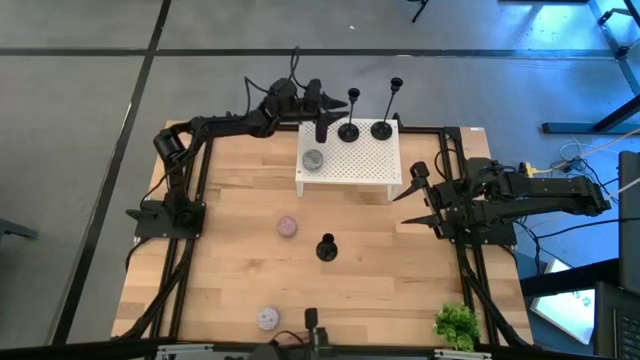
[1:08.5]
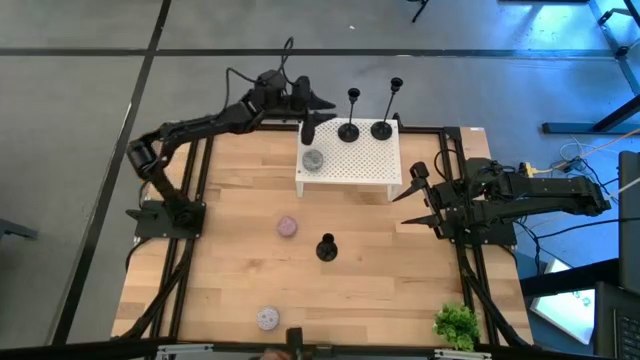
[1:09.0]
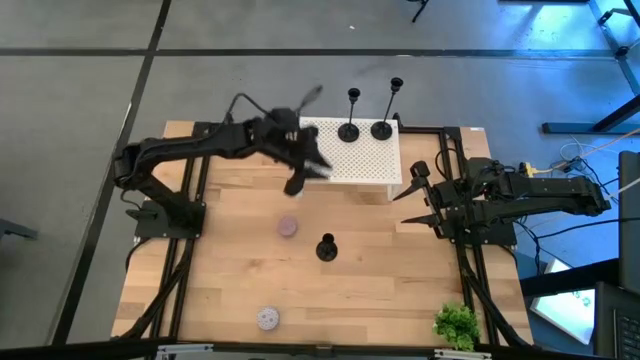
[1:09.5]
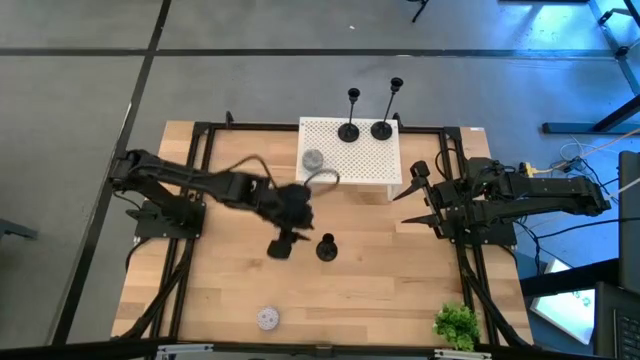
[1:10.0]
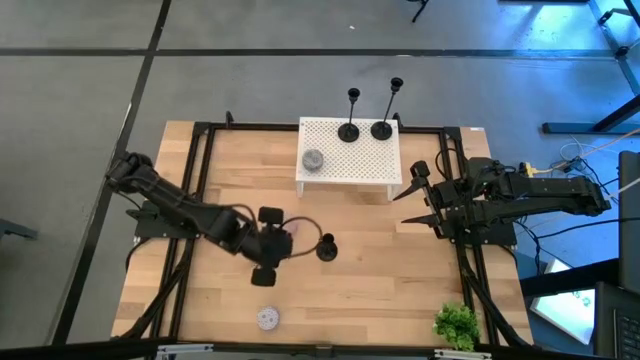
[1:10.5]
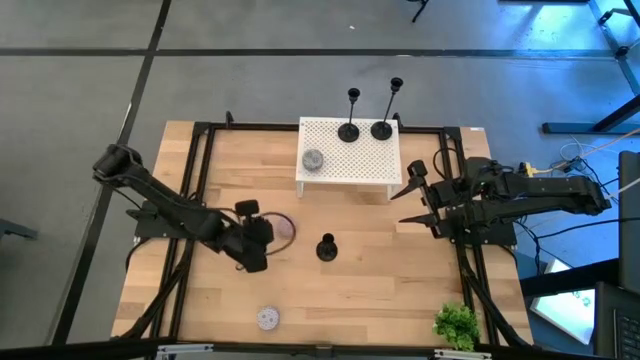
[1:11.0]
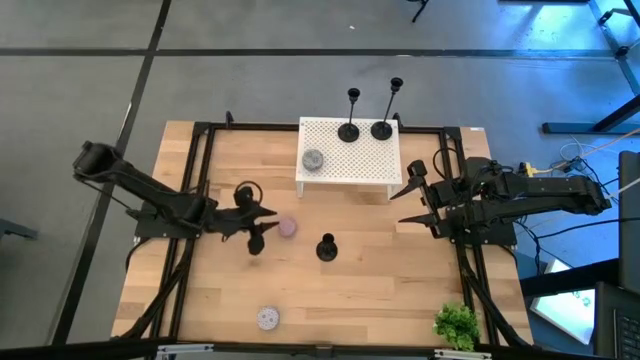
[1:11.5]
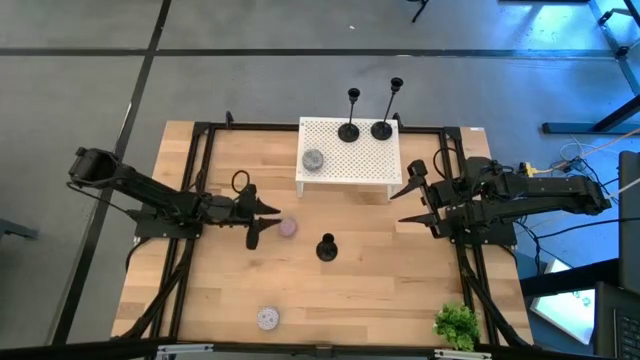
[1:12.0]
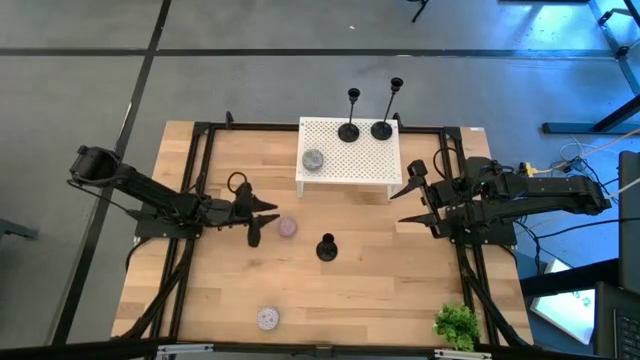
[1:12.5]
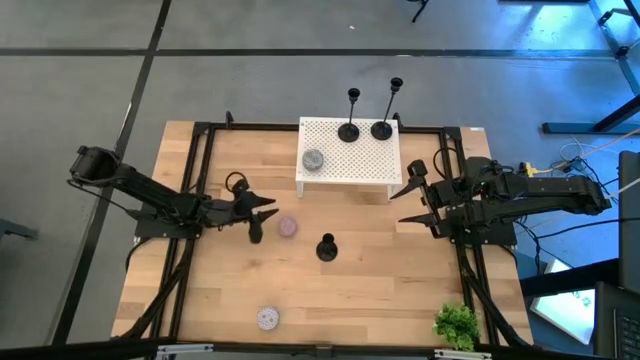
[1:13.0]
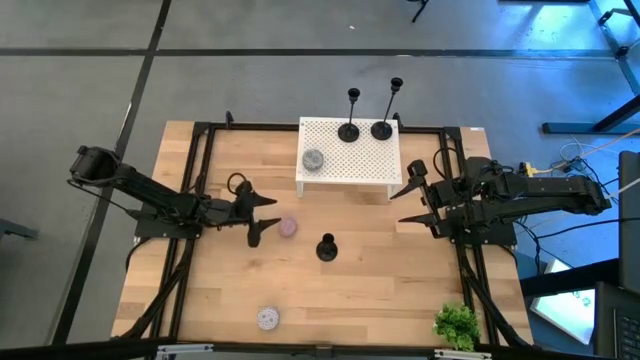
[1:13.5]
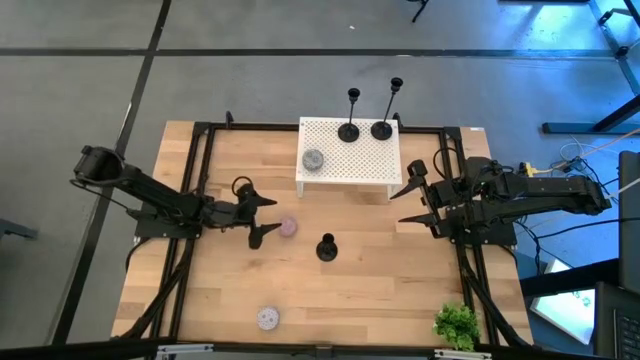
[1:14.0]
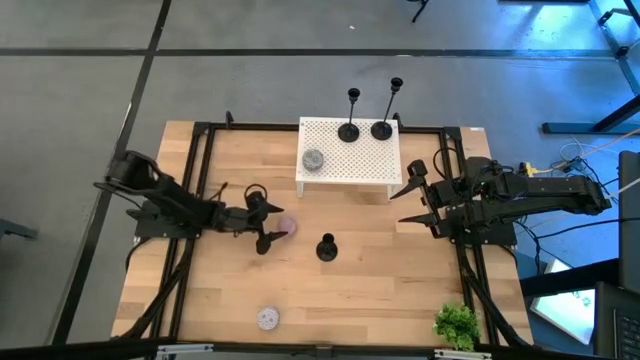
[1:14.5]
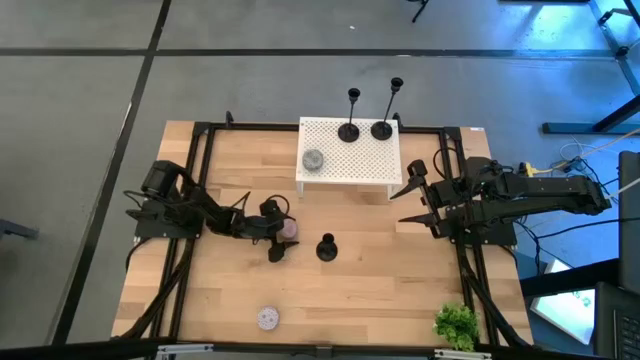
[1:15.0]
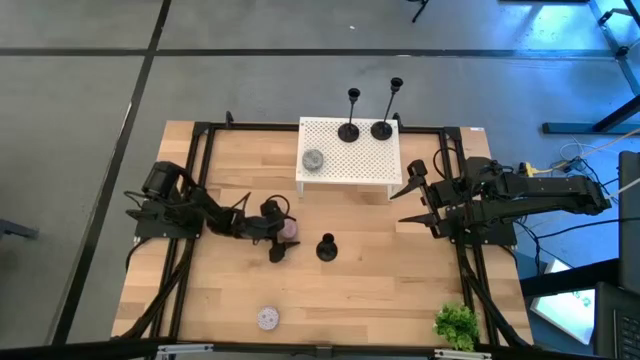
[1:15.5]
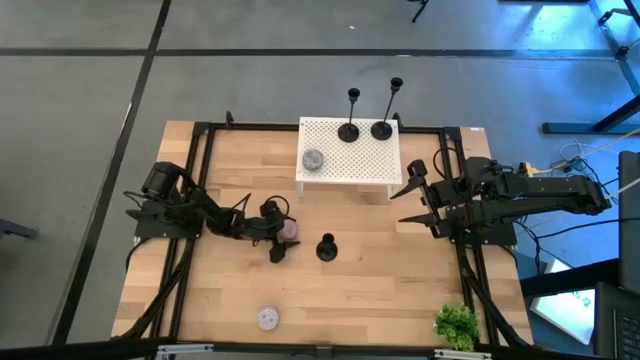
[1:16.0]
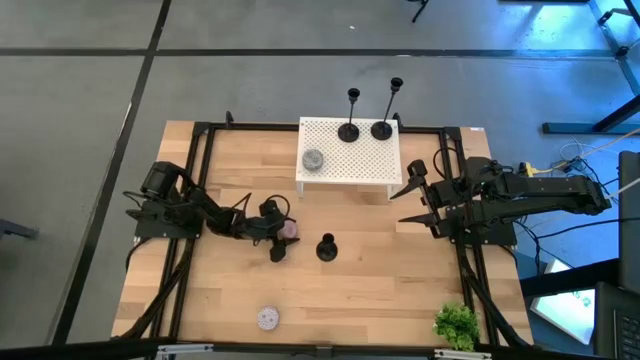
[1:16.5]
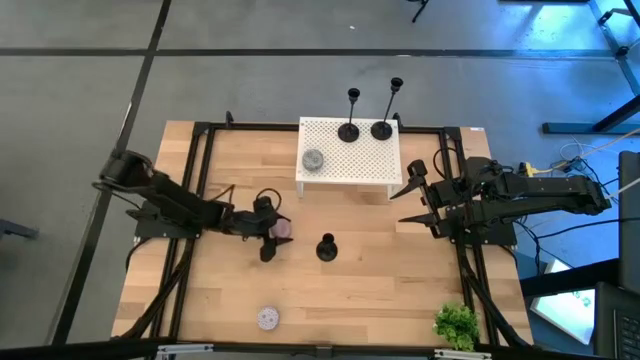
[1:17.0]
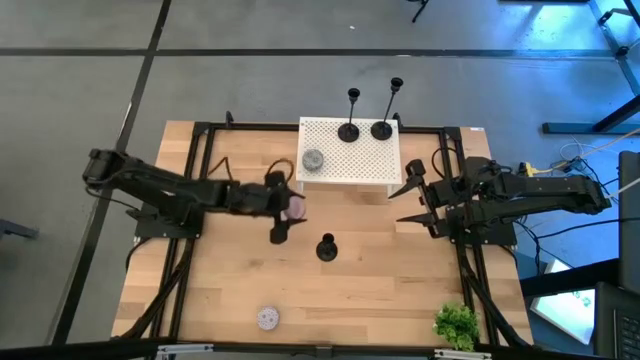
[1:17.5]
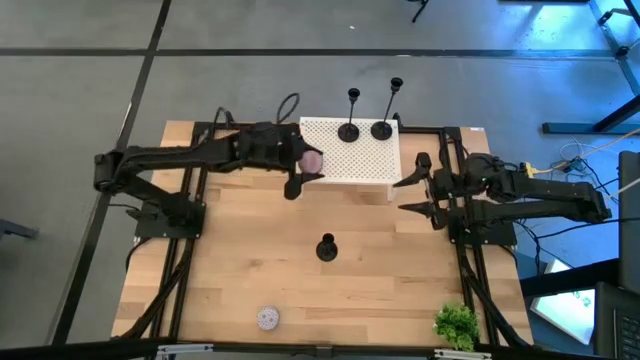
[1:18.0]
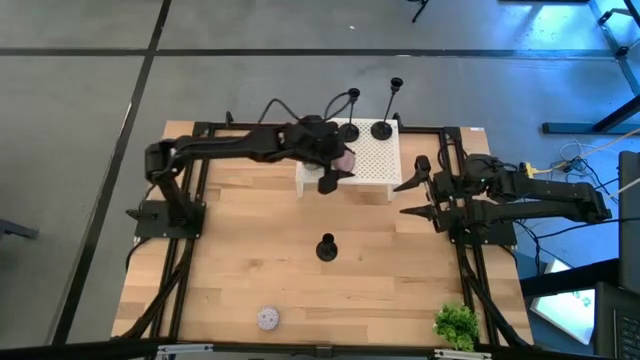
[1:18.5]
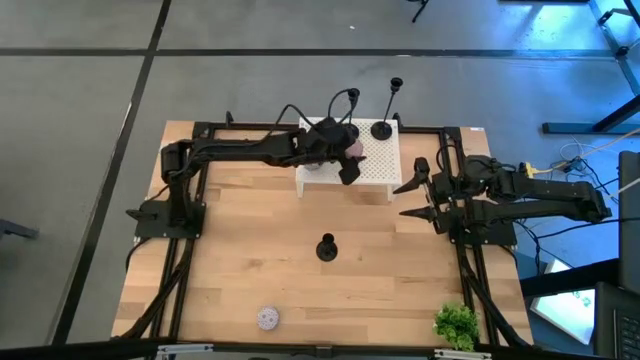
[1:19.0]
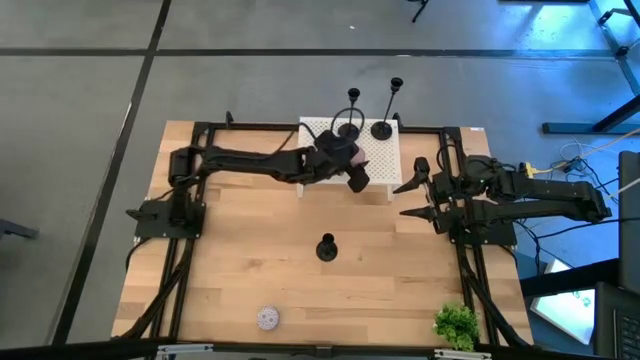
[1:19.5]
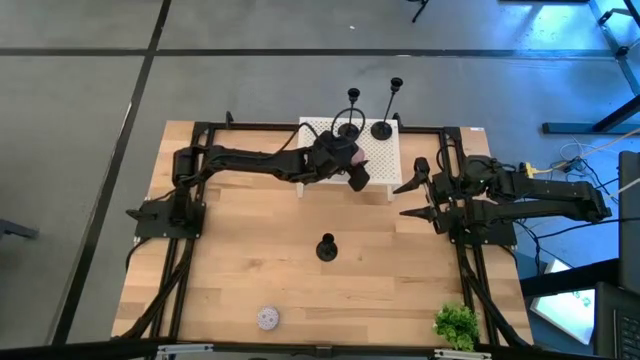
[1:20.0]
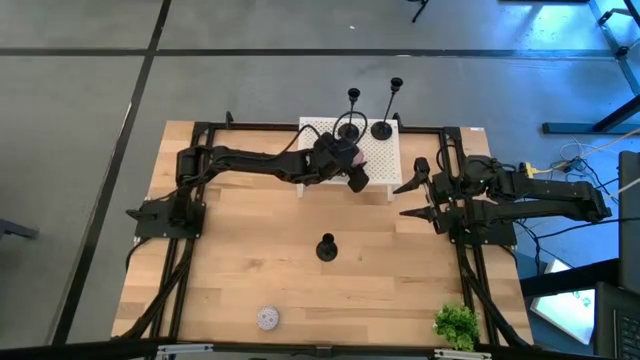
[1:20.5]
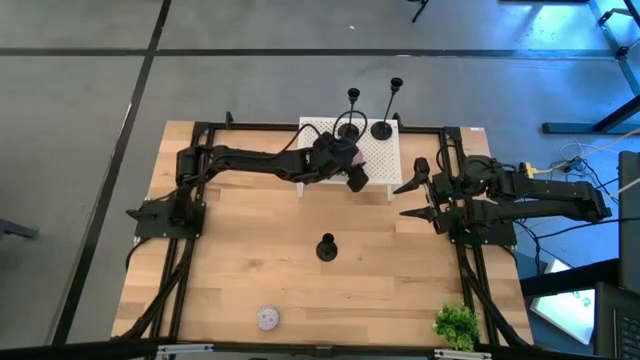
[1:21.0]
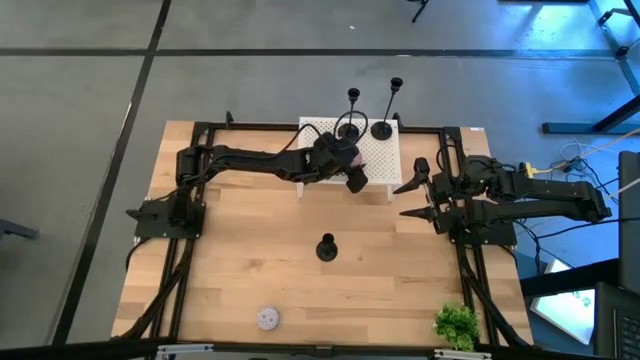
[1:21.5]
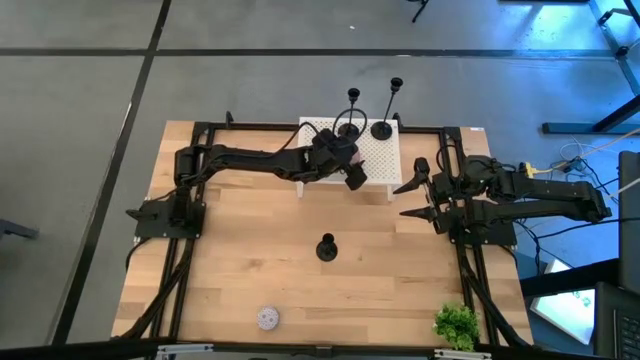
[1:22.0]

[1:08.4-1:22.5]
Task: Pick & Place candle stick holders
Put the pink scented candle on the shelf aligned with the other scented candle

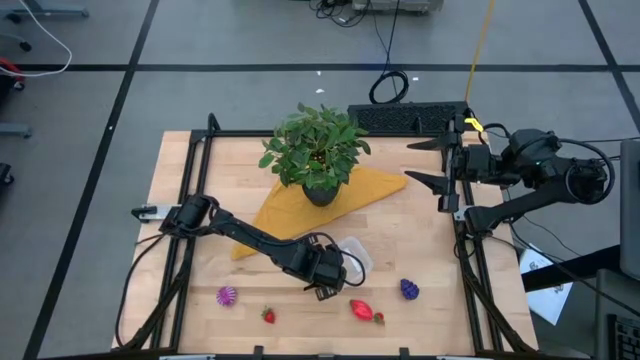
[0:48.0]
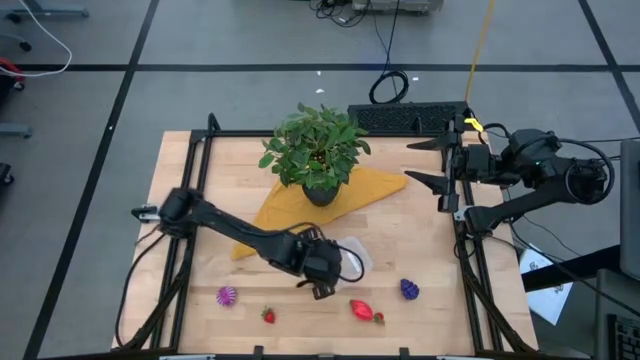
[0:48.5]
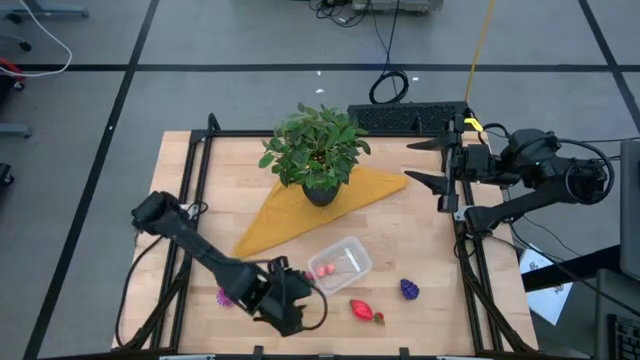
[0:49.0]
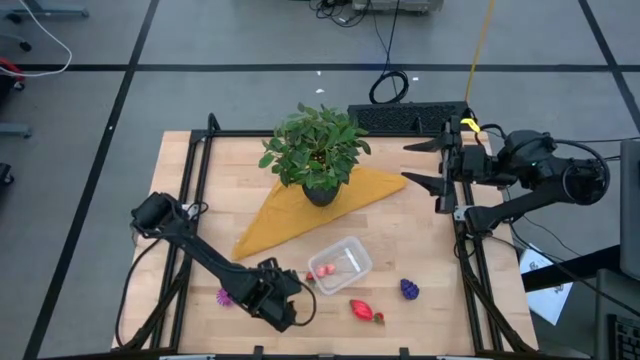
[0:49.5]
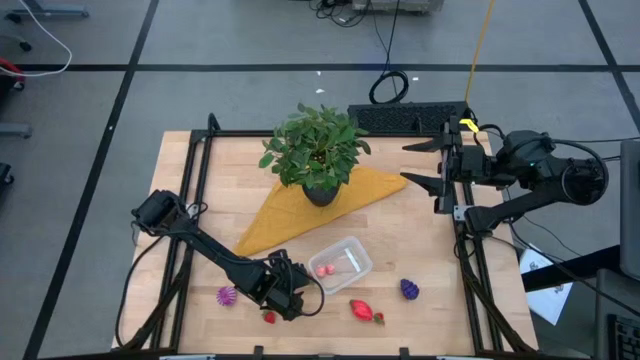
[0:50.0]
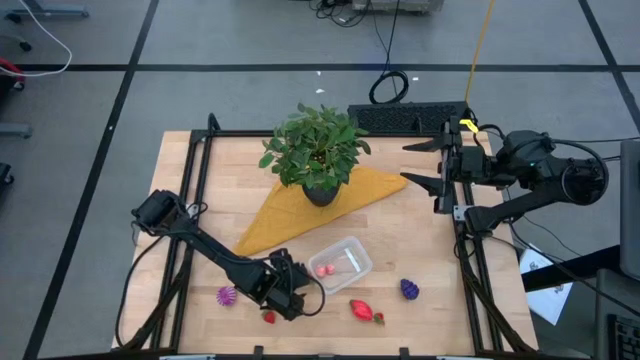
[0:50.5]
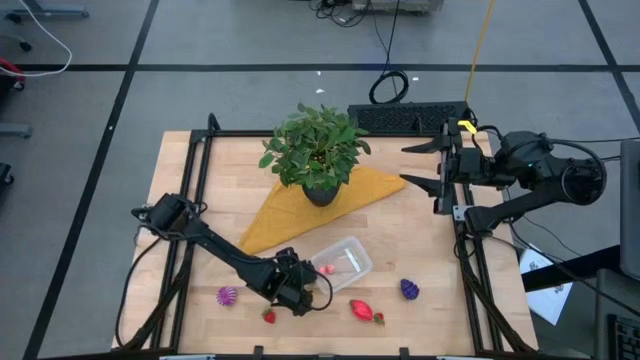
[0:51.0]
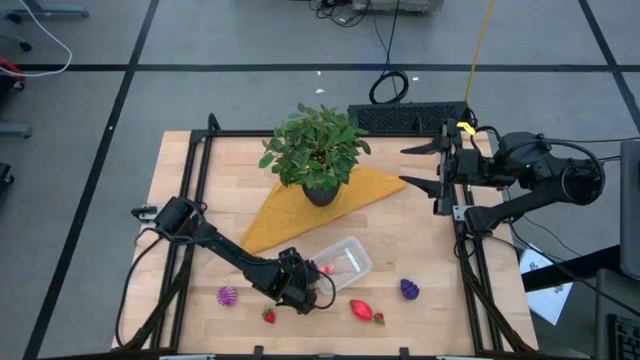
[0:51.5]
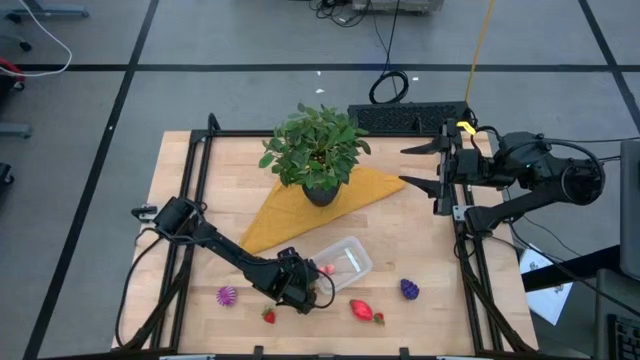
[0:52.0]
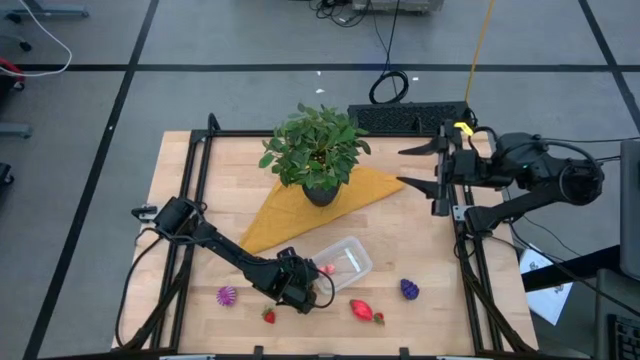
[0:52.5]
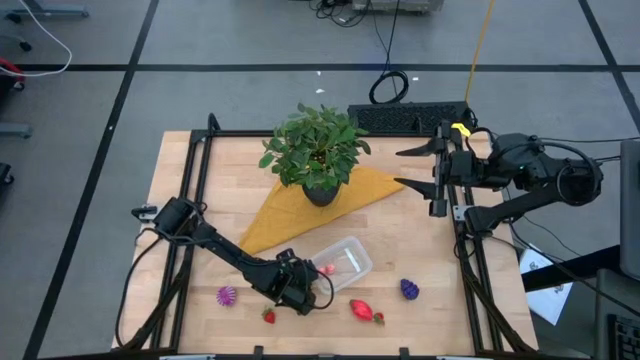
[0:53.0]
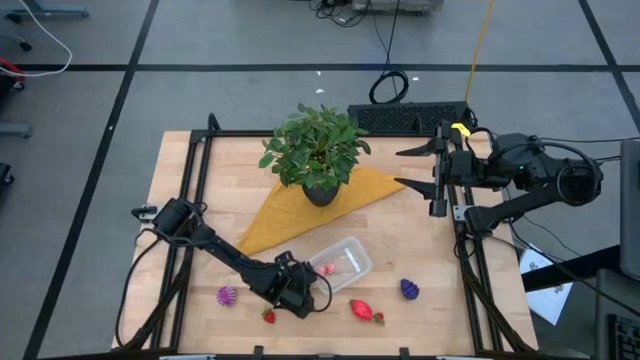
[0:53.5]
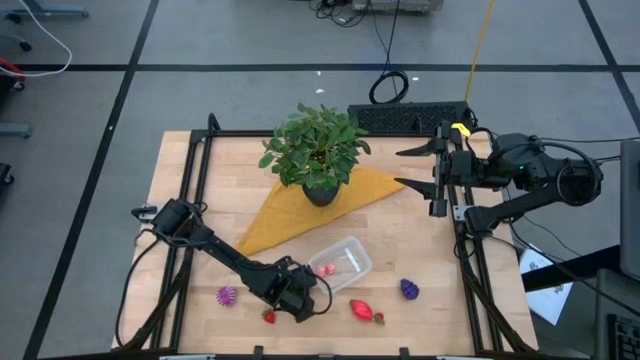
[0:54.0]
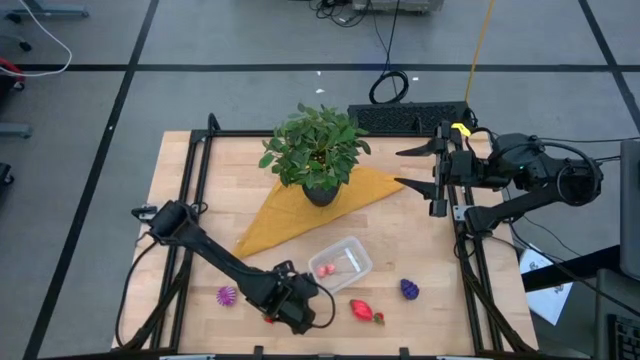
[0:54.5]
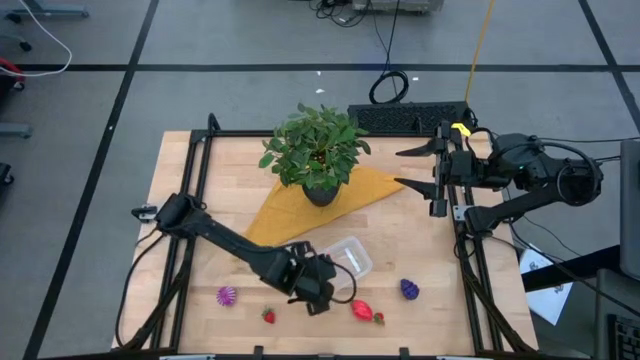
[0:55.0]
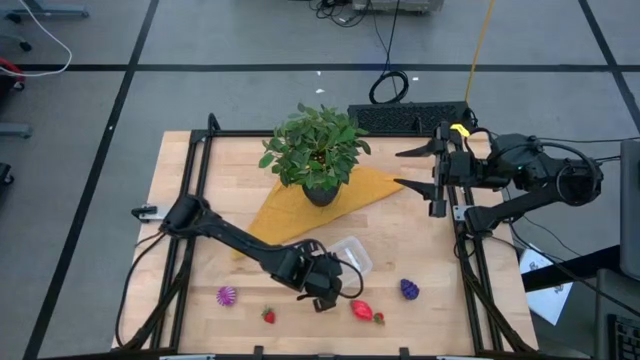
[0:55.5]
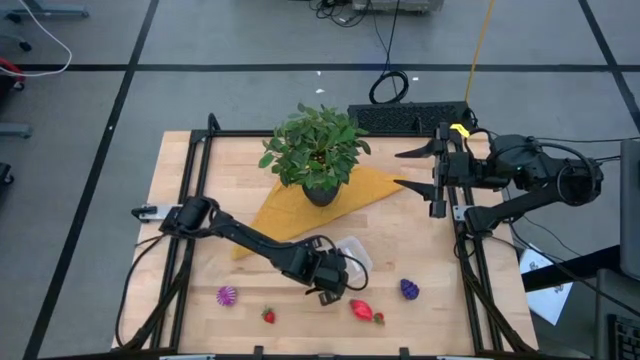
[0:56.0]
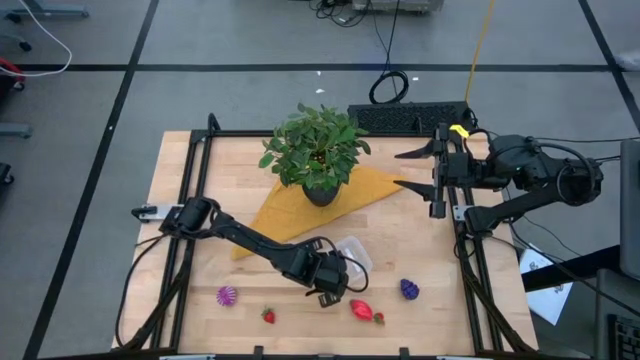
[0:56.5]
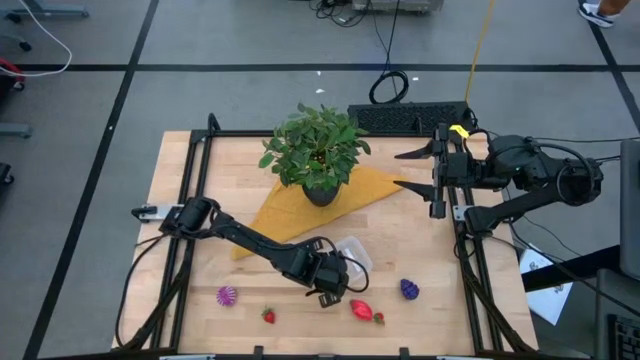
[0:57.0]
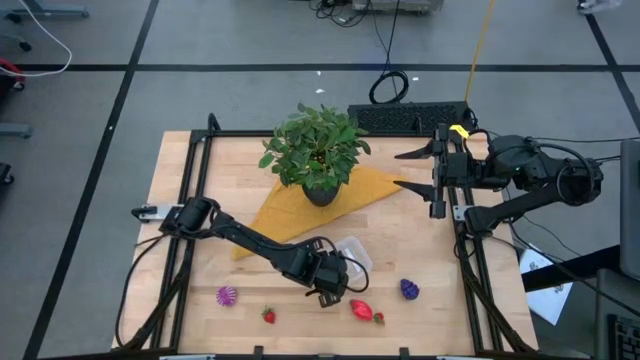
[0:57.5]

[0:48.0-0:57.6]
Task: Pick and placing Produce into tupperware
Put the top strawberry into the transparent bin
